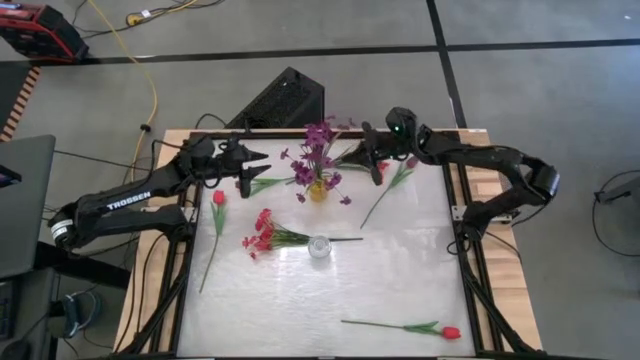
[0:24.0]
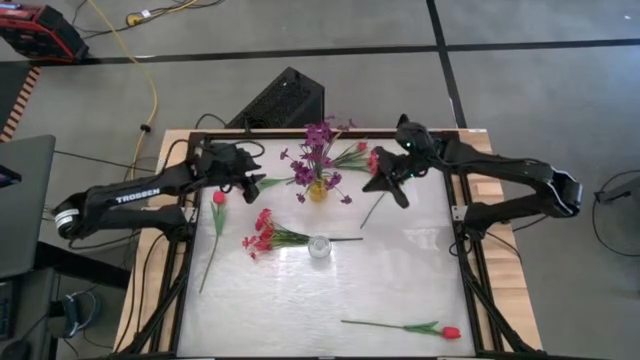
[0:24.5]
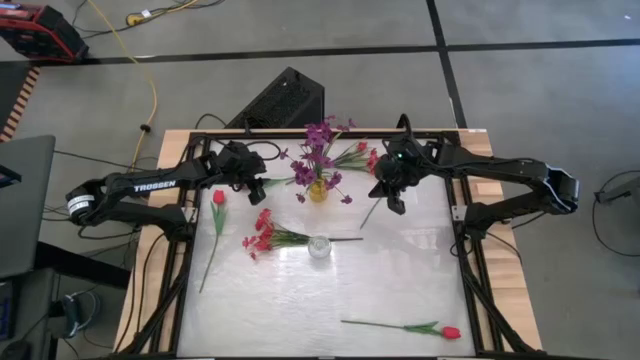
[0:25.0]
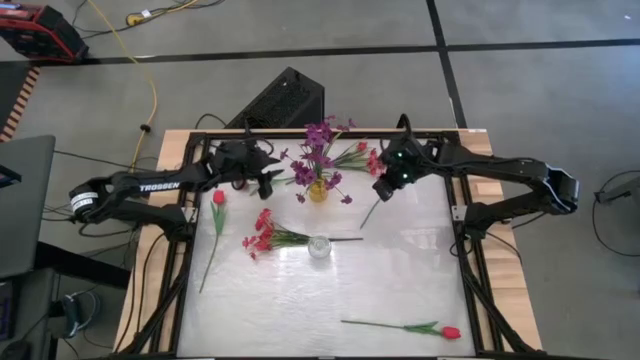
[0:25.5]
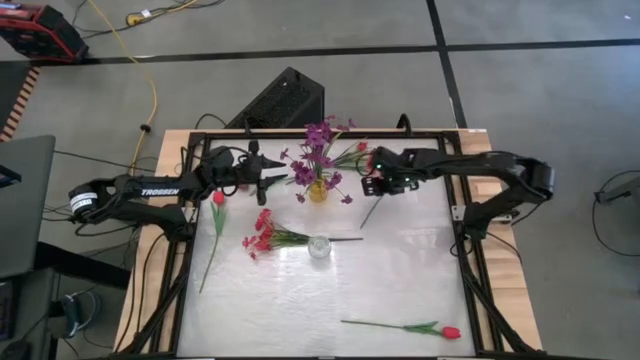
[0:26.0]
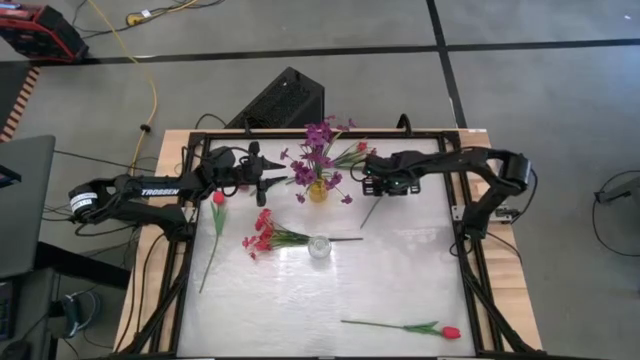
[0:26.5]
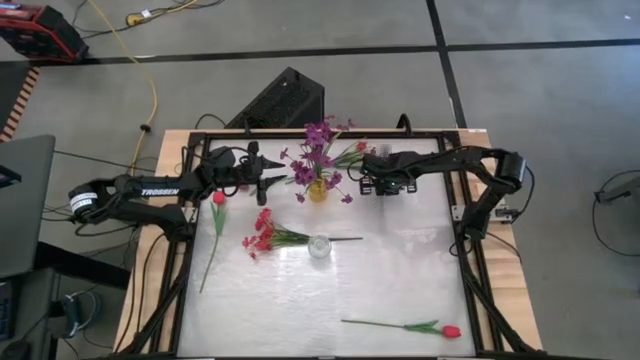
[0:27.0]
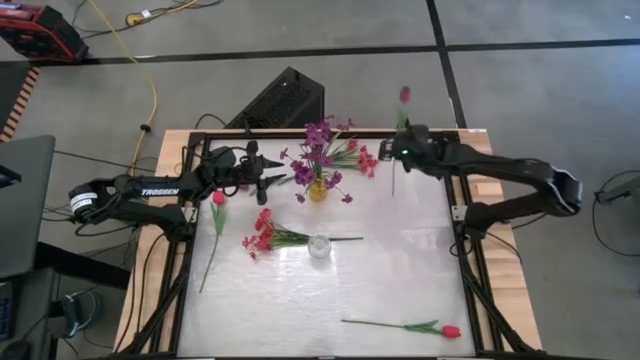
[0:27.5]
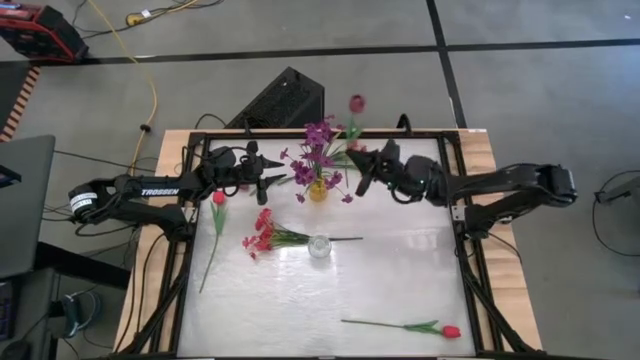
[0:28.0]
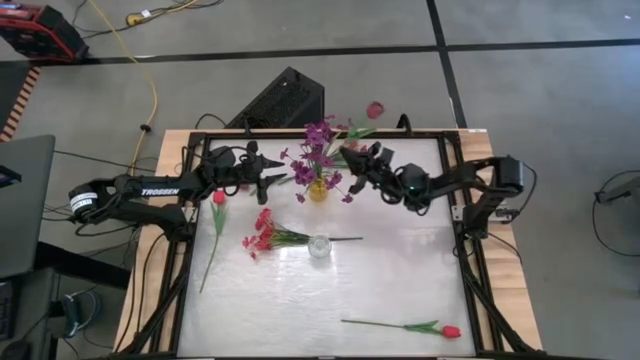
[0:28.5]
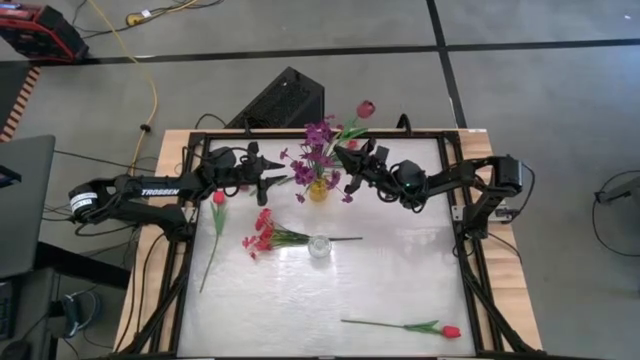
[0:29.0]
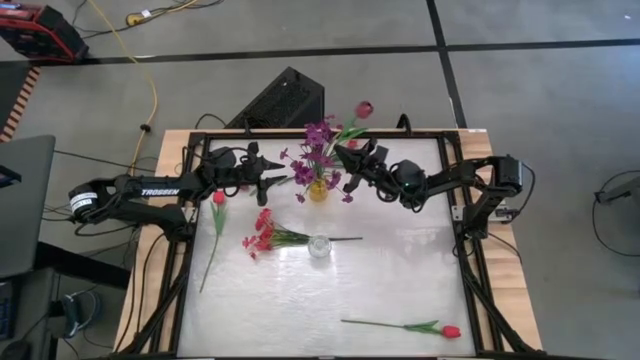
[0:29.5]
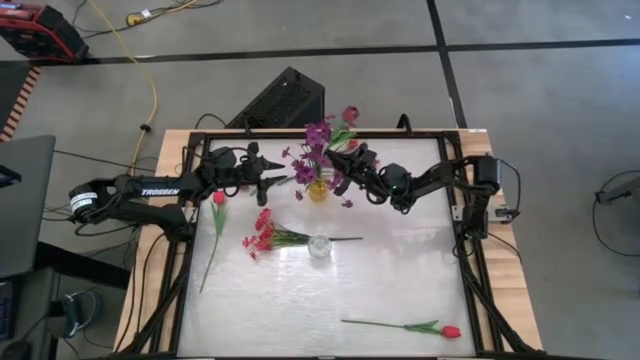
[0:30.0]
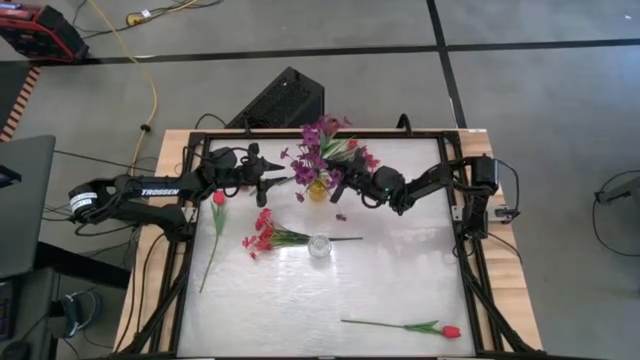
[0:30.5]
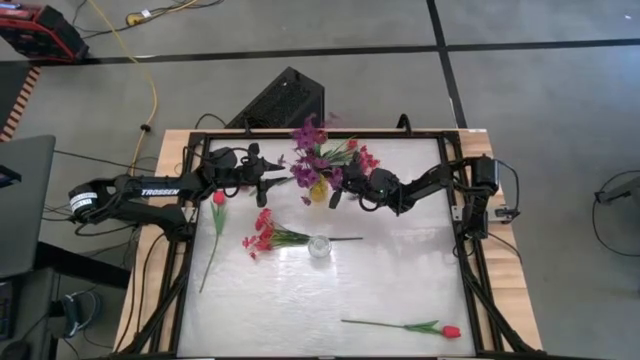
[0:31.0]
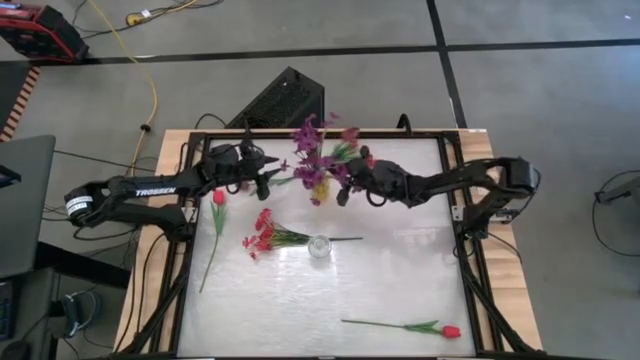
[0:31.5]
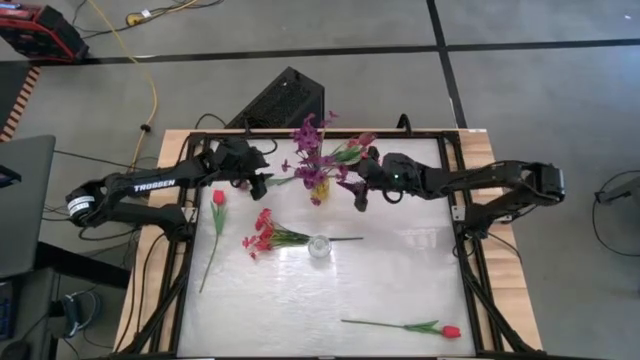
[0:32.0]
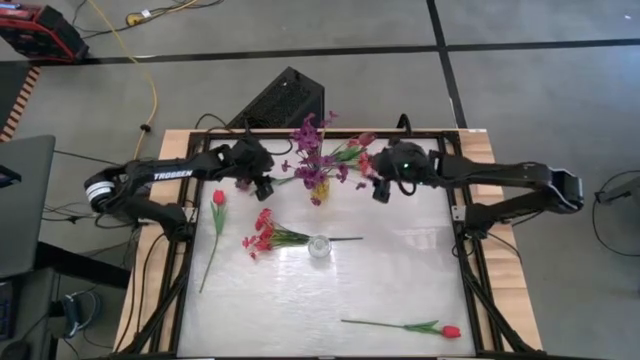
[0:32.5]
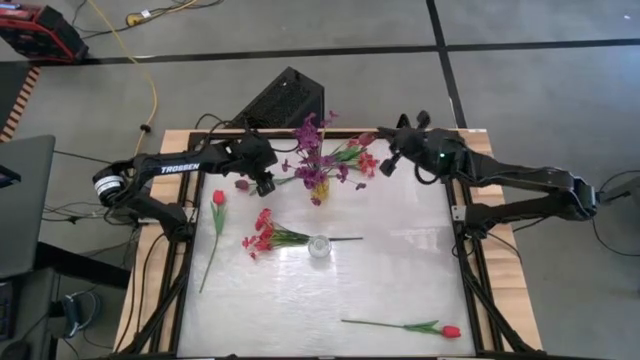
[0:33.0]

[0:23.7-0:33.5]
Task: Sort flowers into vase by color
Put the right dark red tulip into the yellow vase

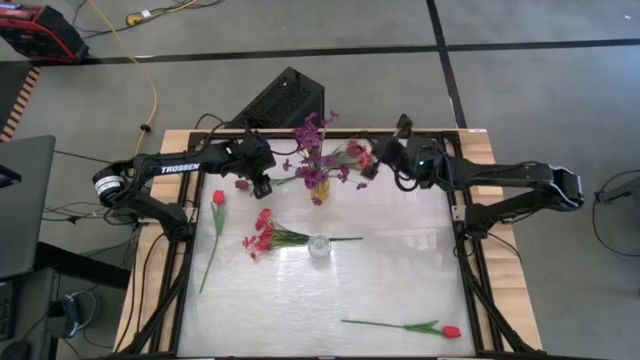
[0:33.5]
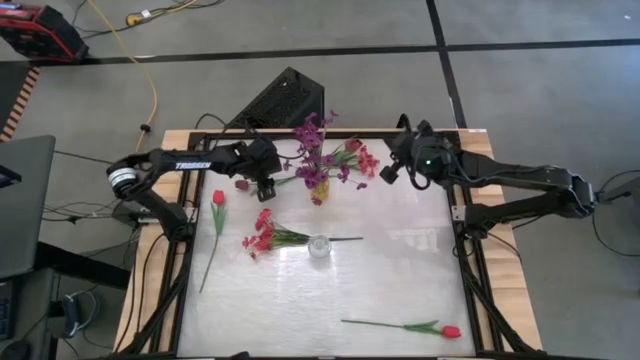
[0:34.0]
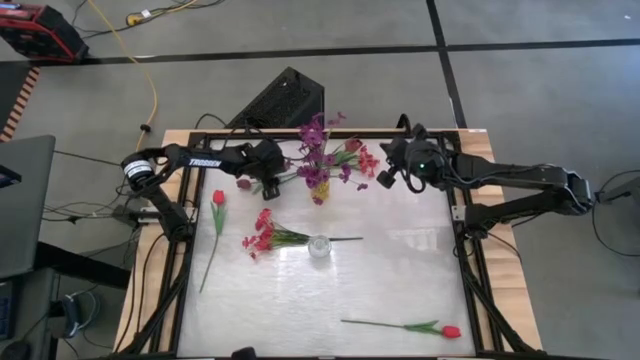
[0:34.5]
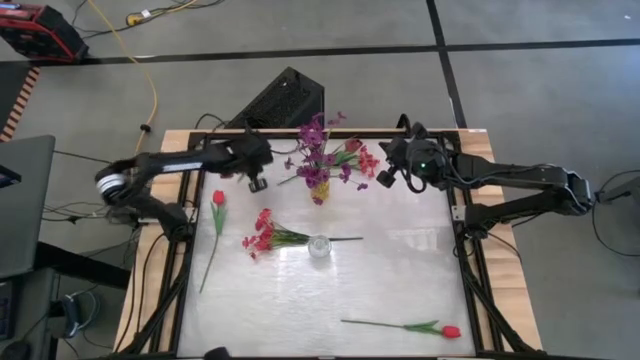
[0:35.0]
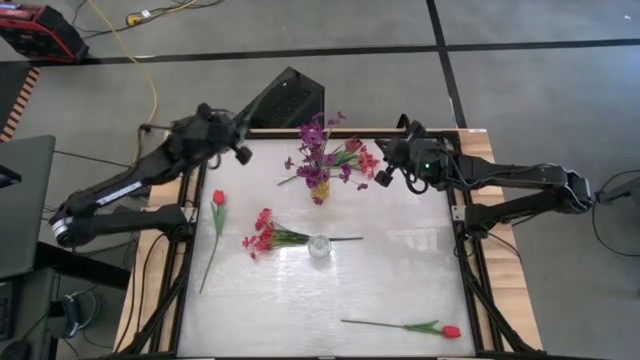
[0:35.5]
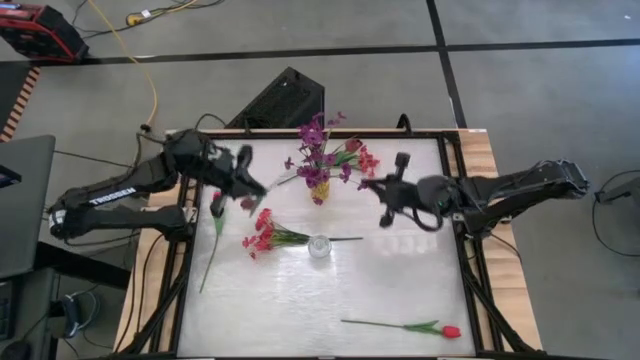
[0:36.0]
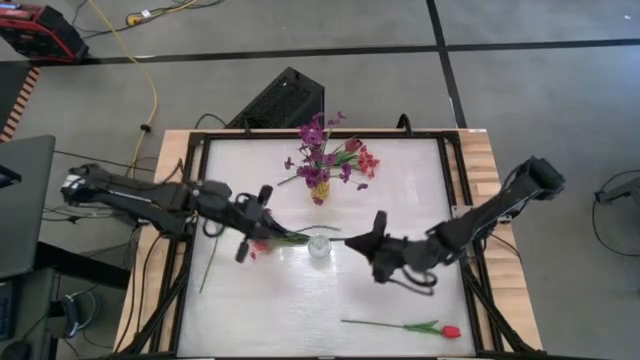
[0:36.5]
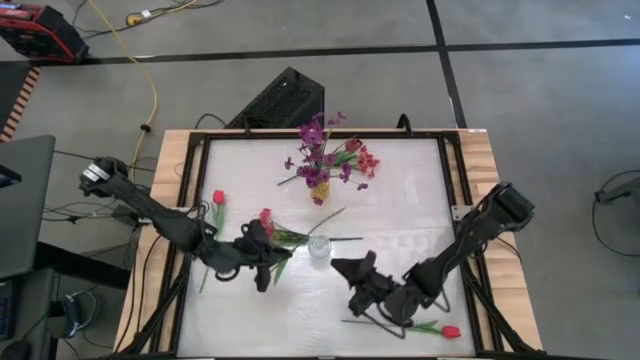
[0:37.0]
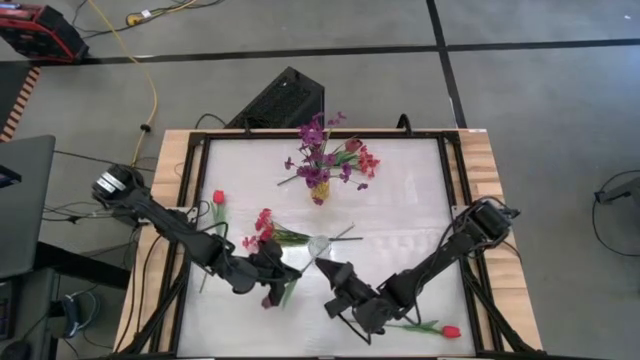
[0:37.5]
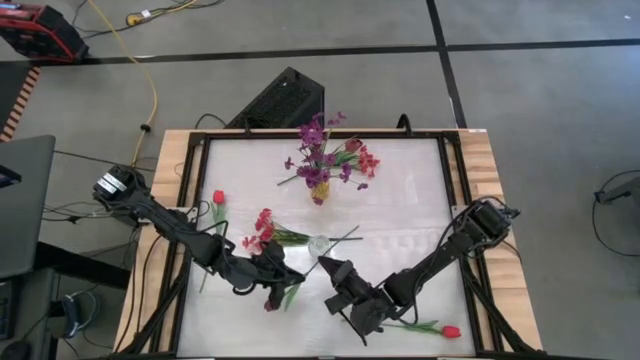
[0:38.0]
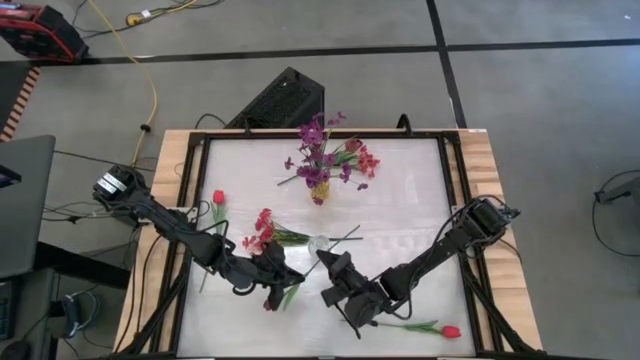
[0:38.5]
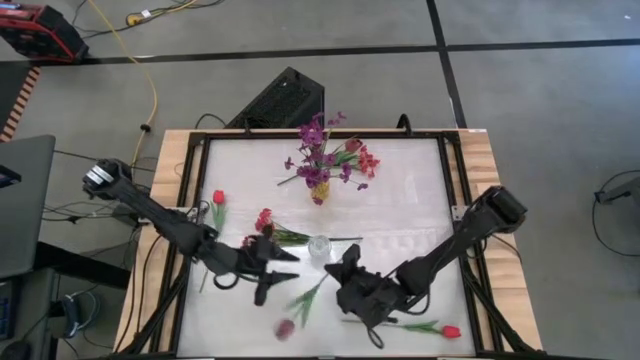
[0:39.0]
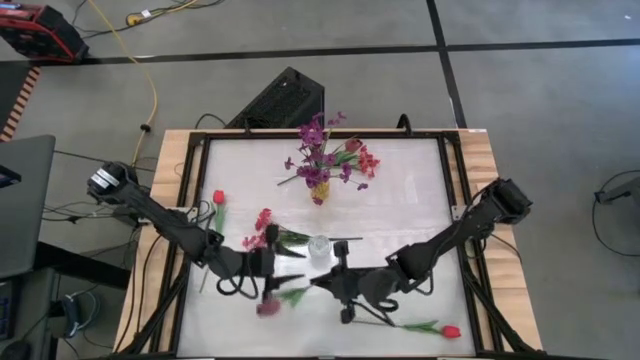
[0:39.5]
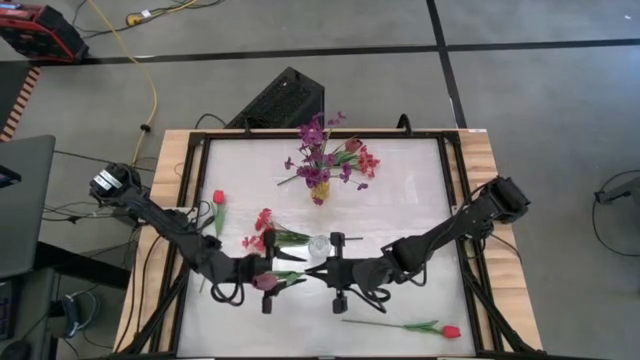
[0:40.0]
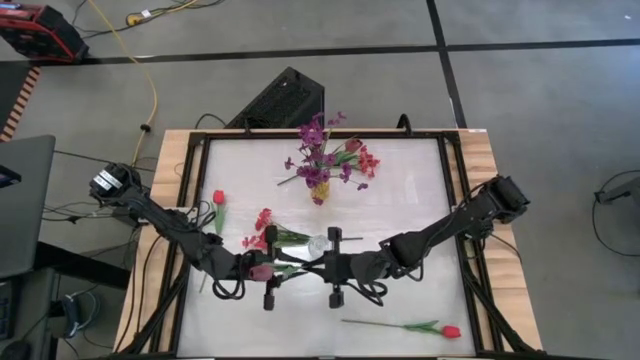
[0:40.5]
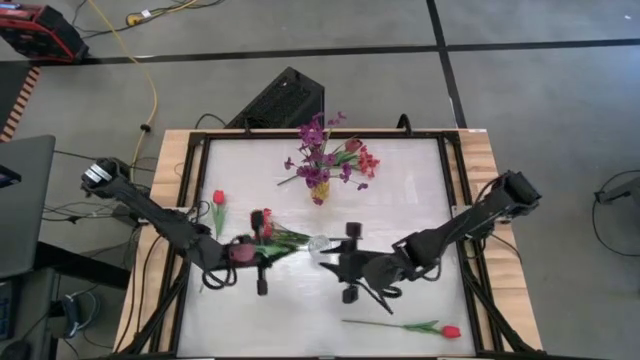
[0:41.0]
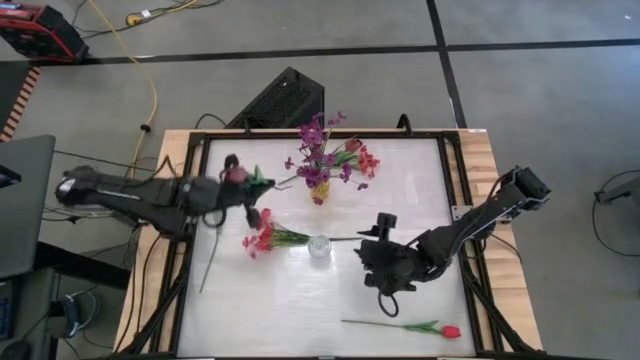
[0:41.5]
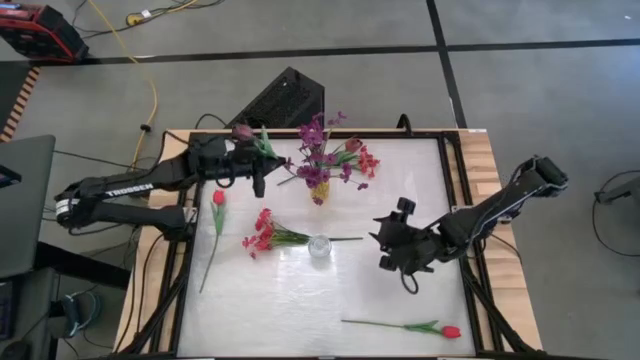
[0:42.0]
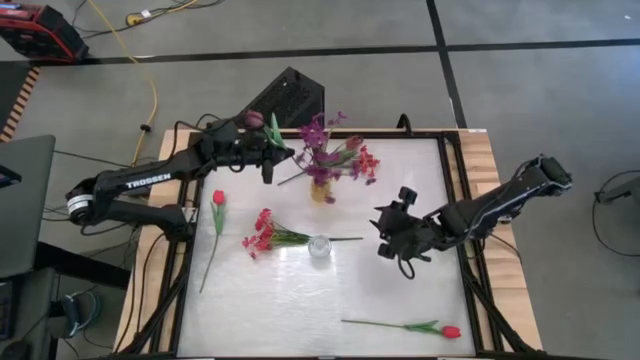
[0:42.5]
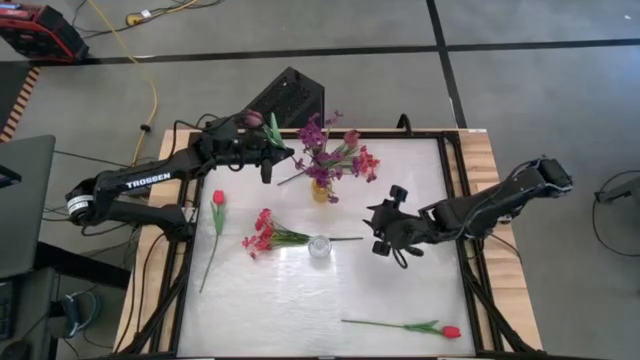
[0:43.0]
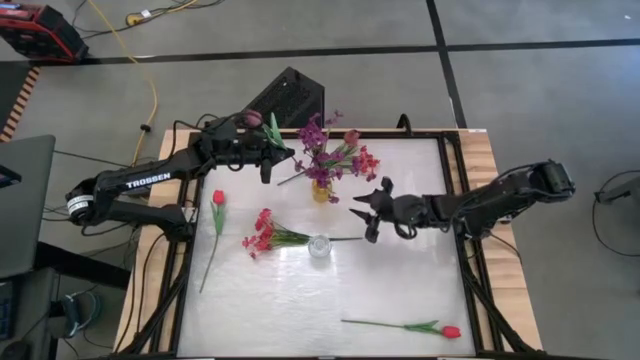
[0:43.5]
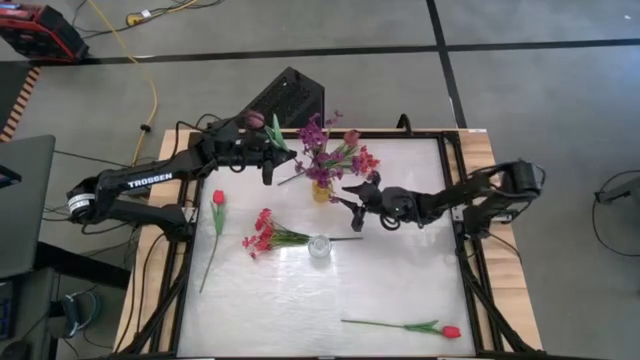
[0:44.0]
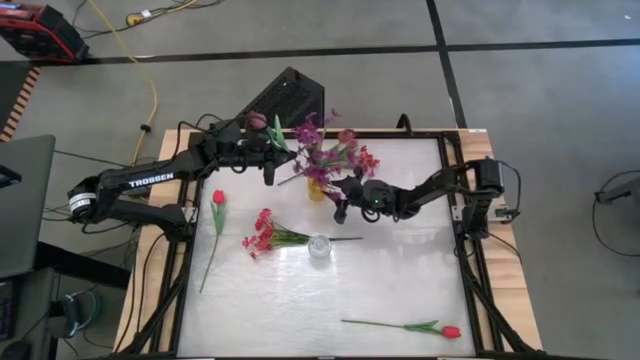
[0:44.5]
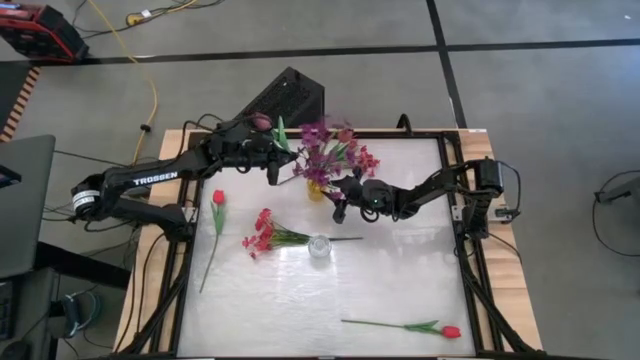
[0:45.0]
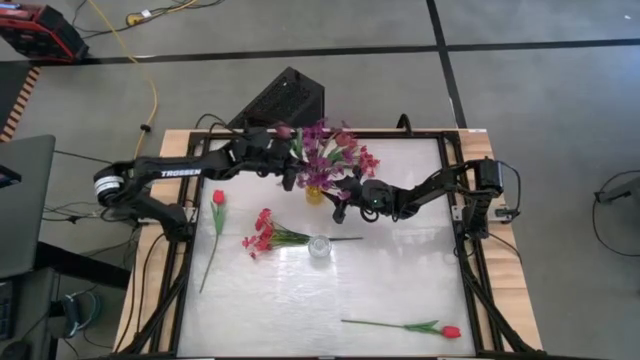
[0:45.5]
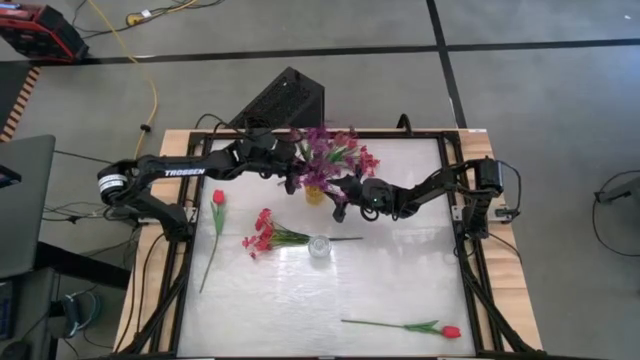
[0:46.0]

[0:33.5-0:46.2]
Put the dark red tulip into the yellow vase
